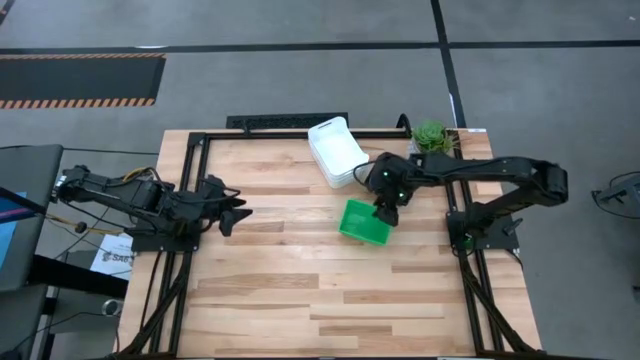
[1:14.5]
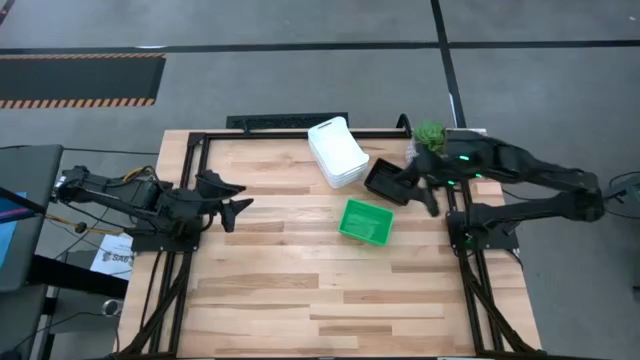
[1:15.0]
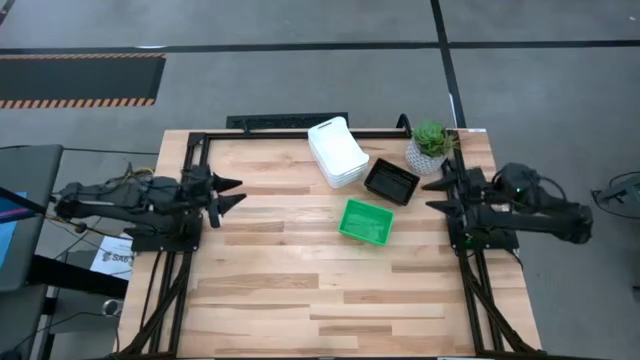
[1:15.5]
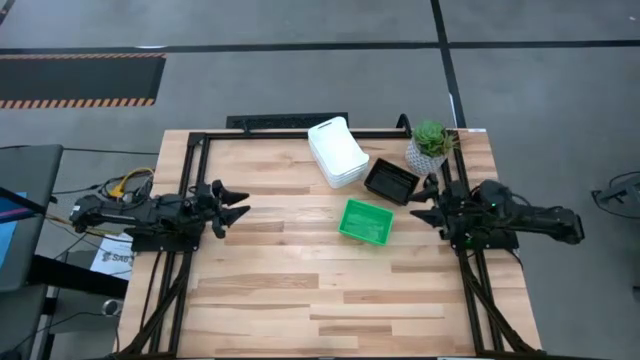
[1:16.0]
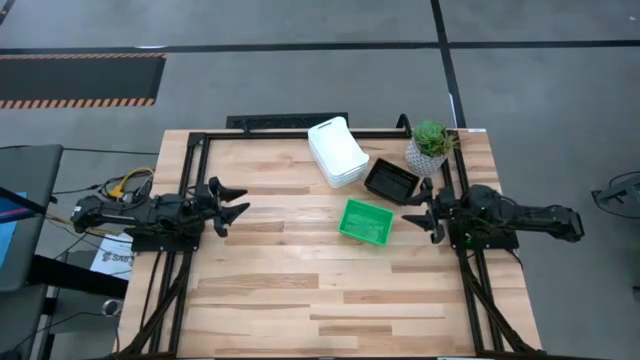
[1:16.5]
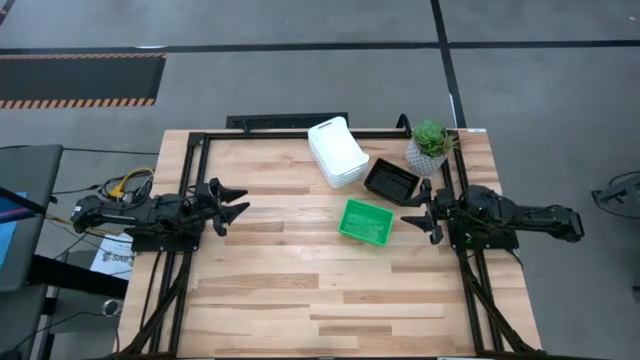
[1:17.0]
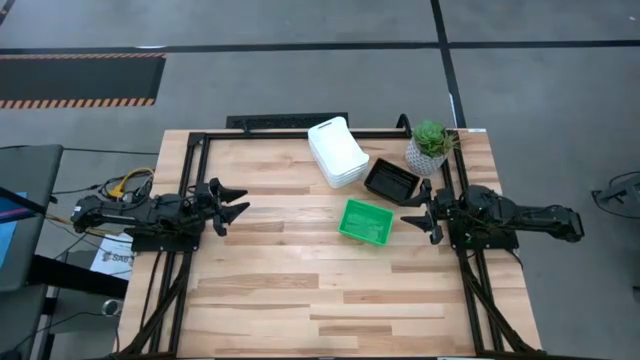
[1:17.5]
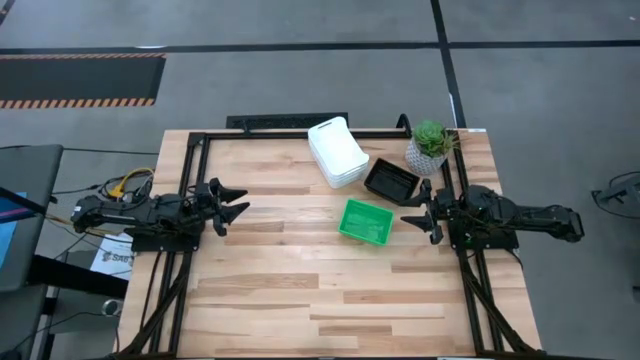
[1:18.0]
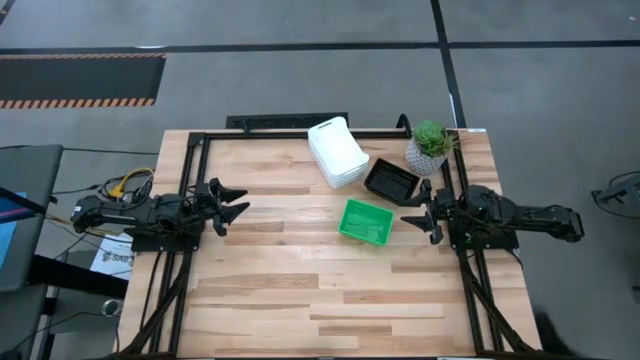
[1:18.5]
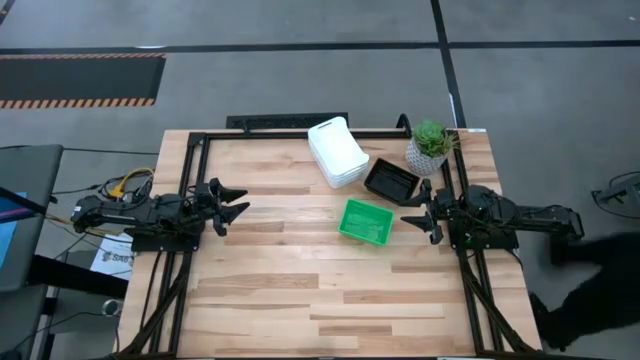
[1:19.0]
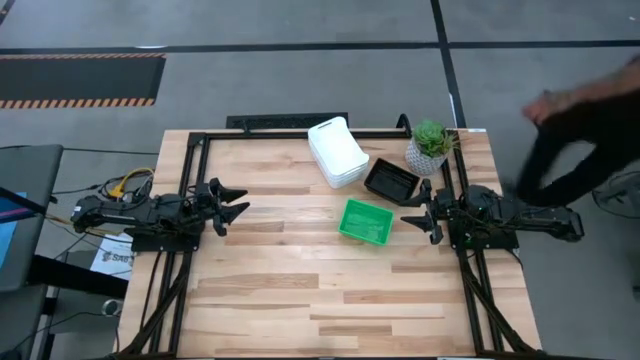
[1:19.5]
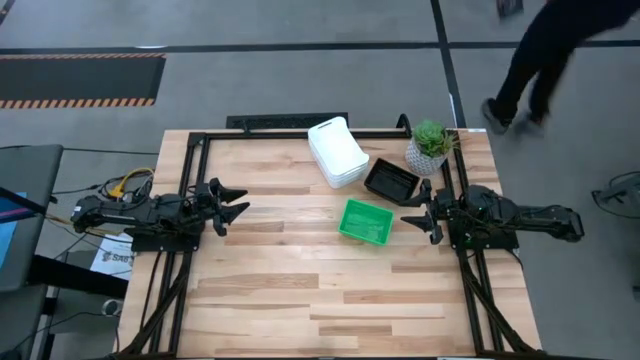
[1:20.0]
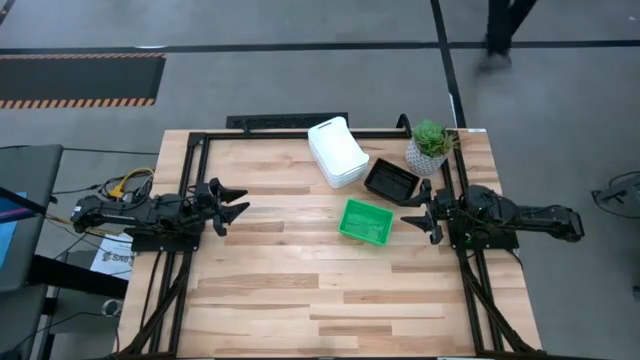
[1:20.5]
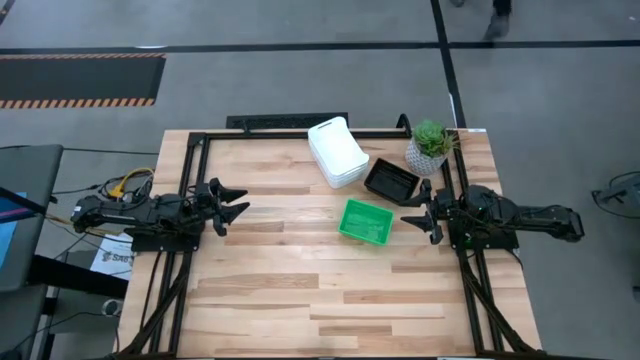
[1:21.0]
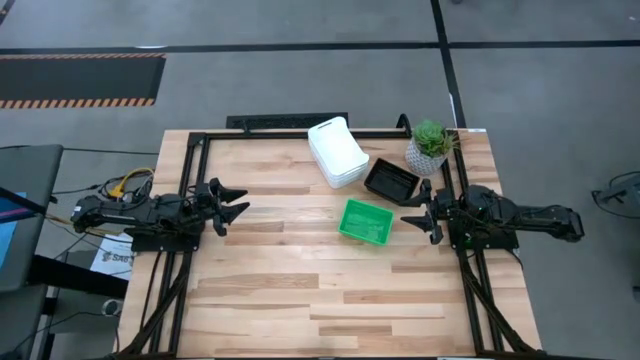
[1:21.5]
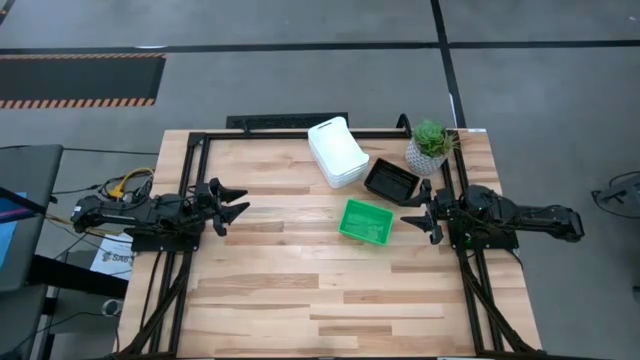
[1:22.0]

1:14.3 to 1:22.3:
Return to Home Position

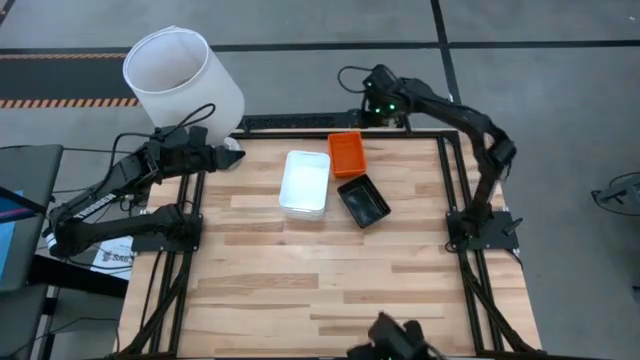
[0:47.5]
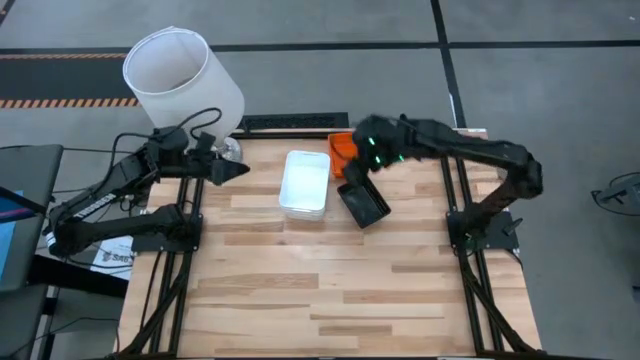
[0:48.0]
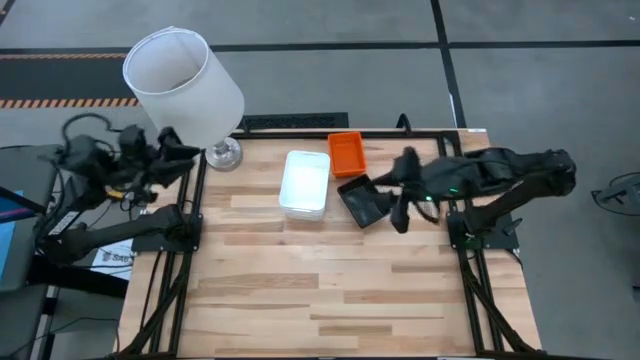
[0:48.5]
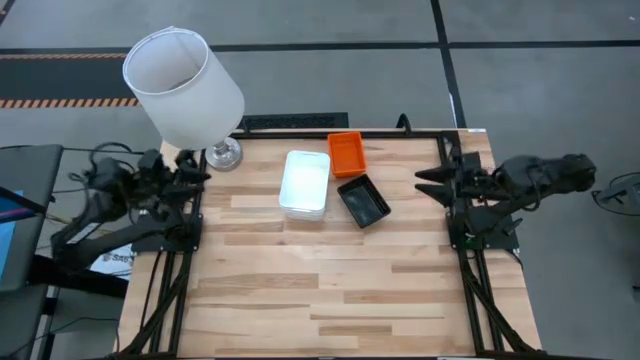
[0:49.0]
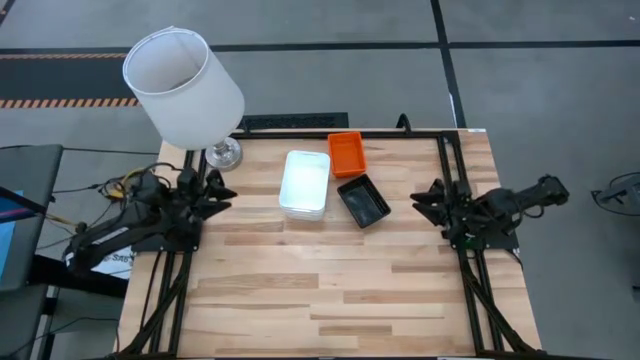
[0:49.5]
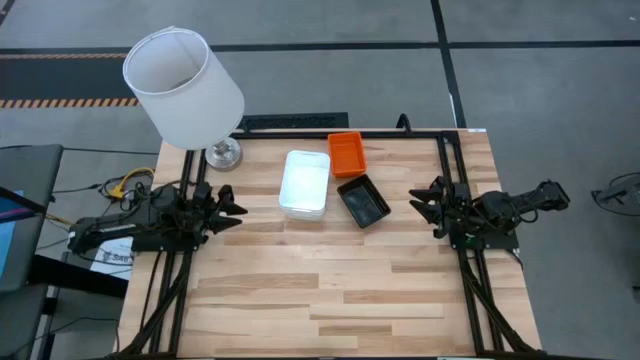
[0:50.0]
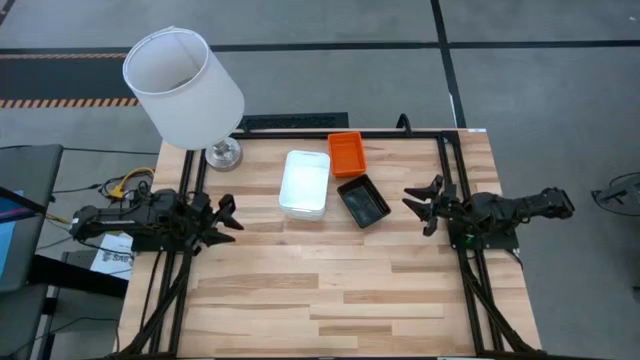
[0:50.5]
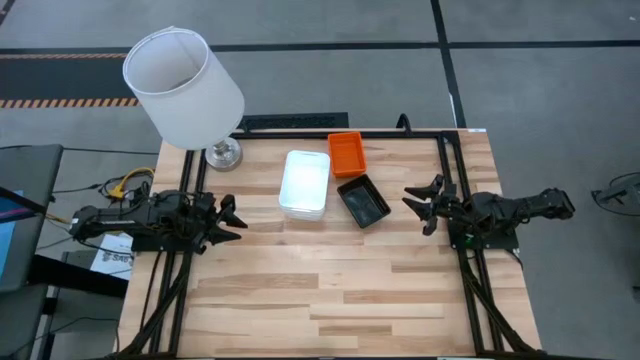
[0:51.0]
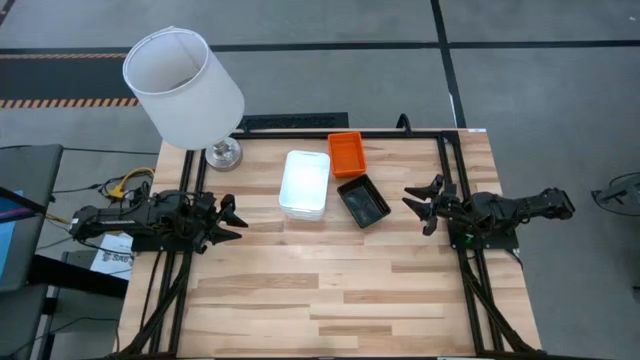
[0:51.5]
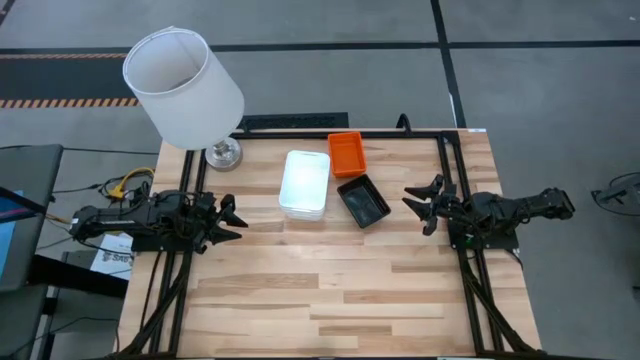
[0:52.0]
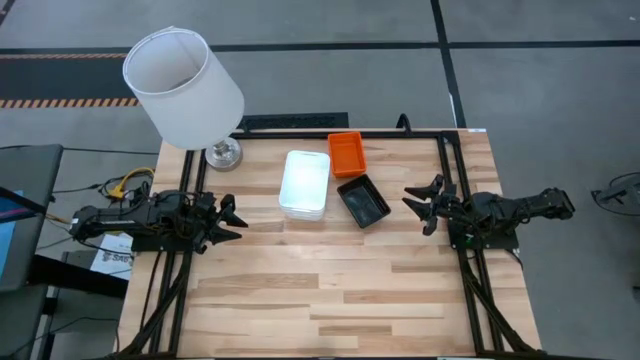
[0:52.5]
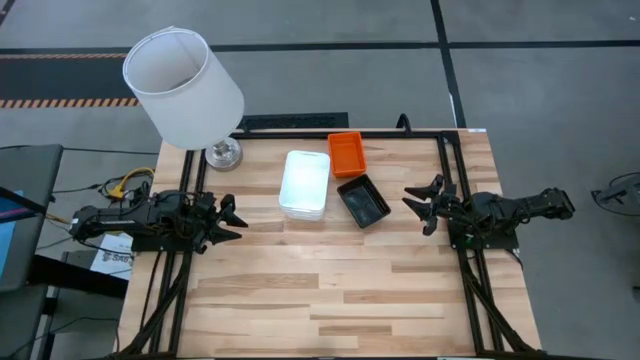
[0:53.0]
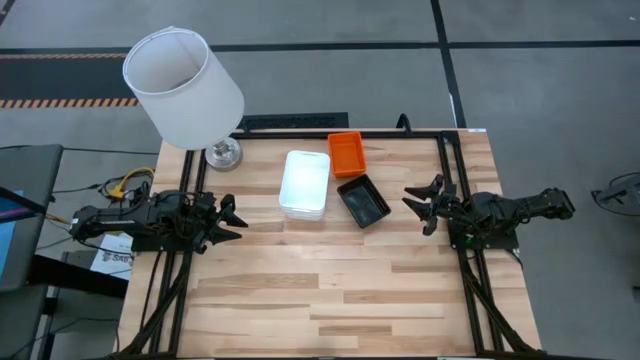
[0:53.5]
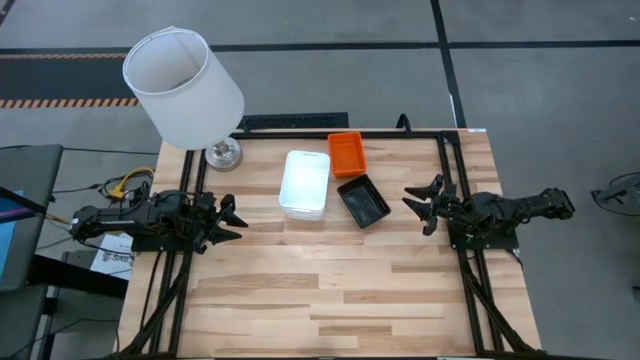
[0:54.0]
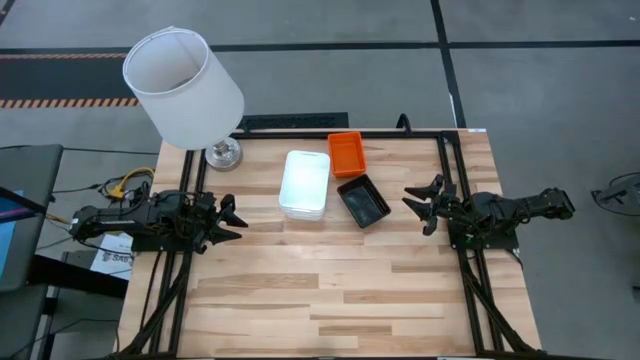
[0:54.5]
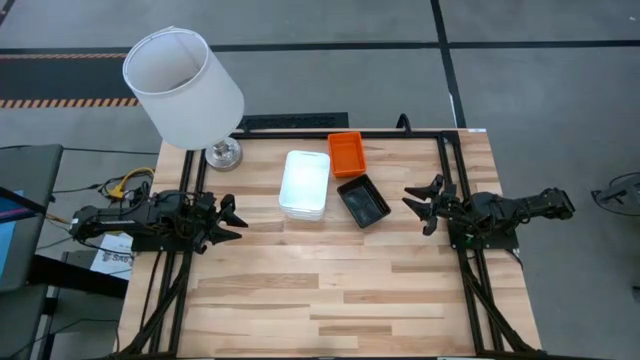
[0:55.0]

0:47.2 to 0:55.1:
Return to Home Position

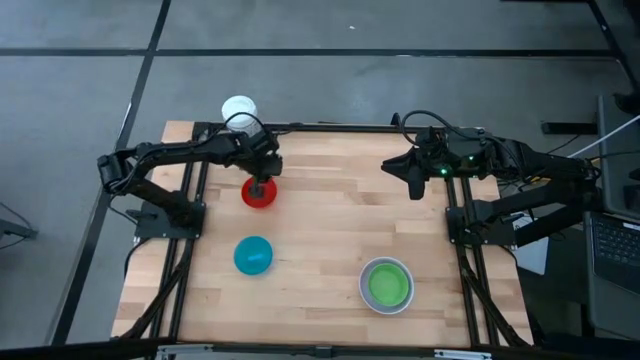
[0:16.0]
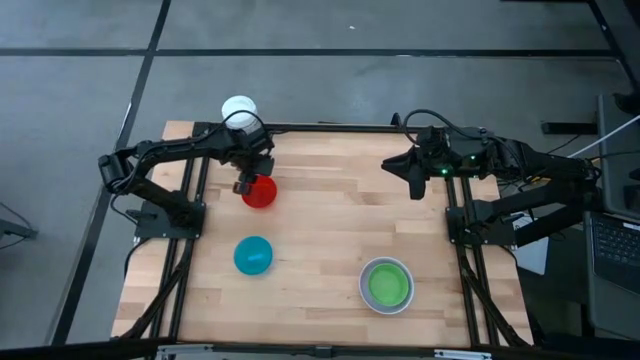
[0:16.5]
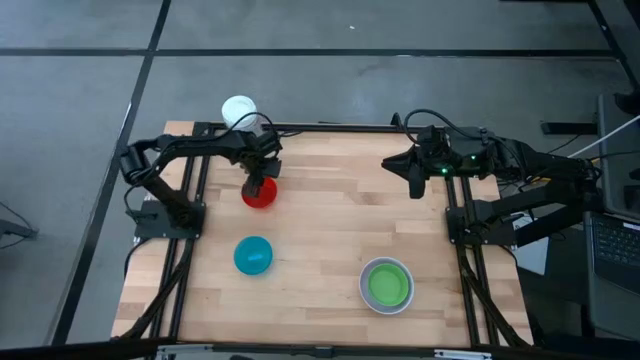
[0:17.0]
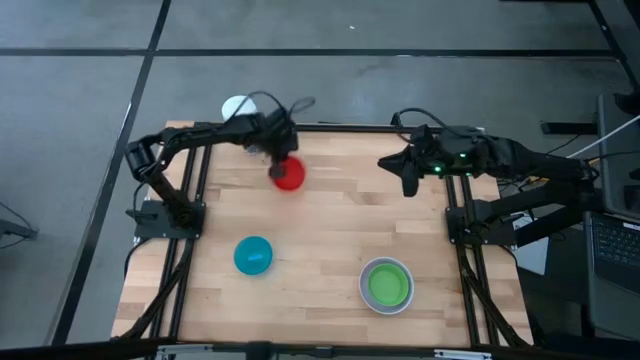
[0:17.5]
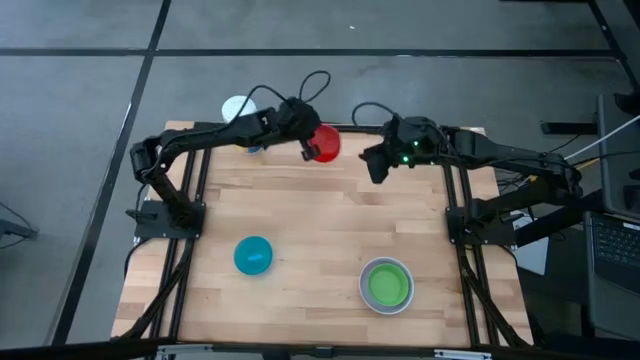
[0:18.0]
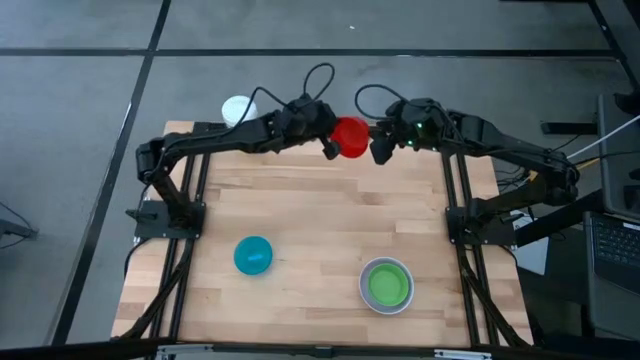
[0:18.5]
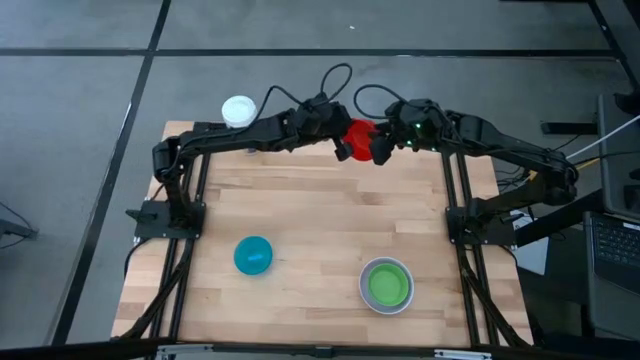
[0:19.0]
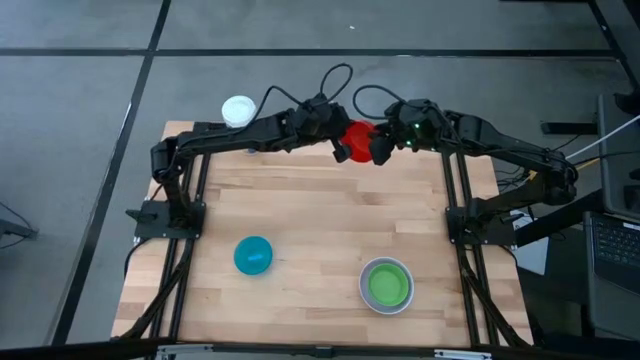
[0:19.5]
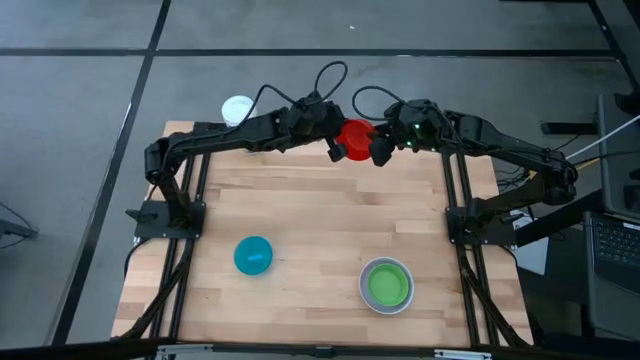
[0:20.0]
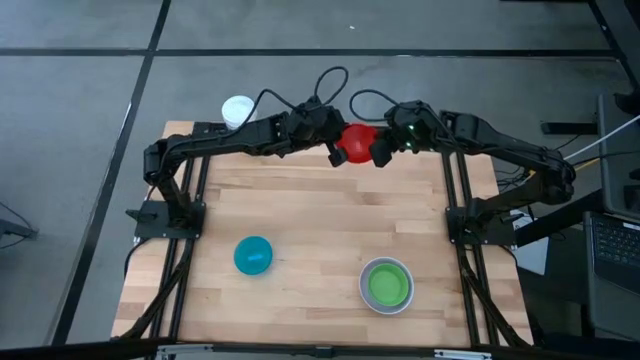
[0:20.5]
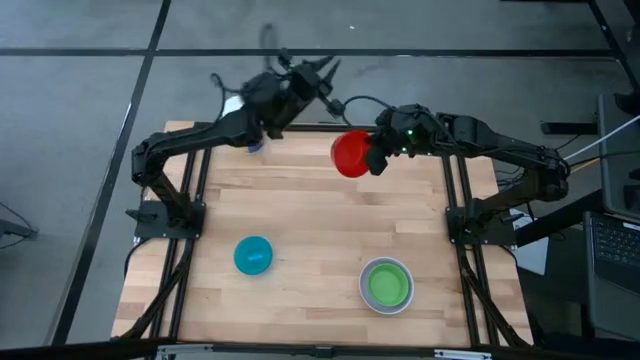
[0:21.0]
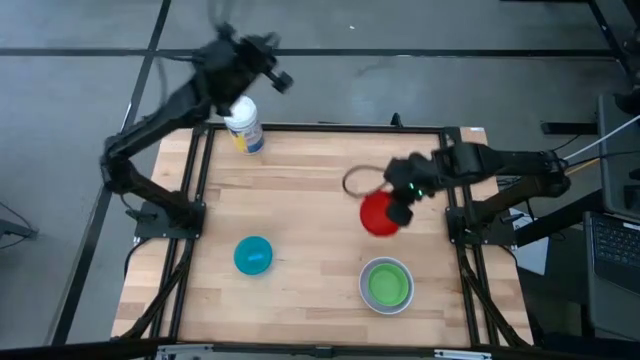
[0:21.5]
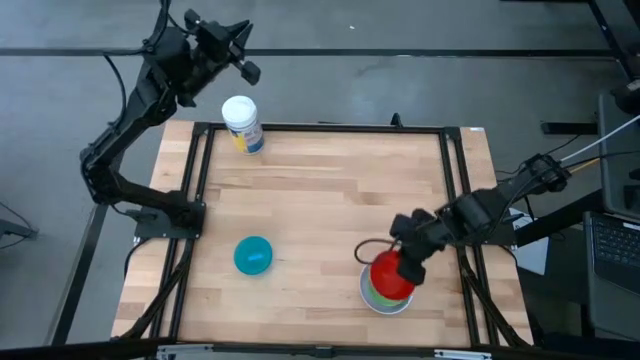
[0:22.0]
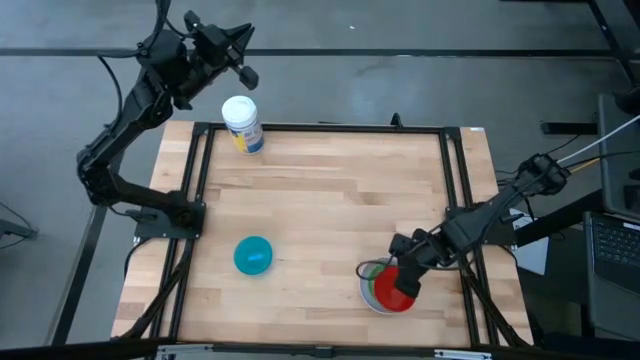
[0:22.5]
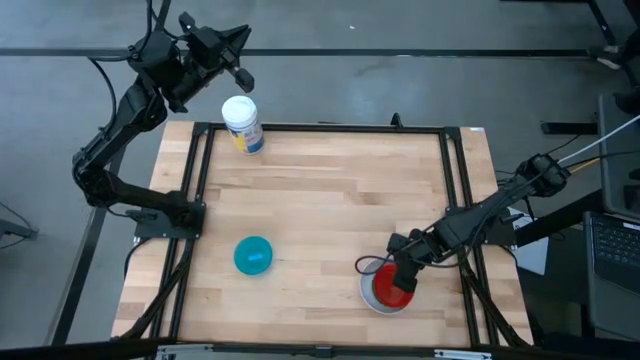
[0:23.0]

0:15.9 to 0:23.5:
Stack the red bowl on top of the green bowl
